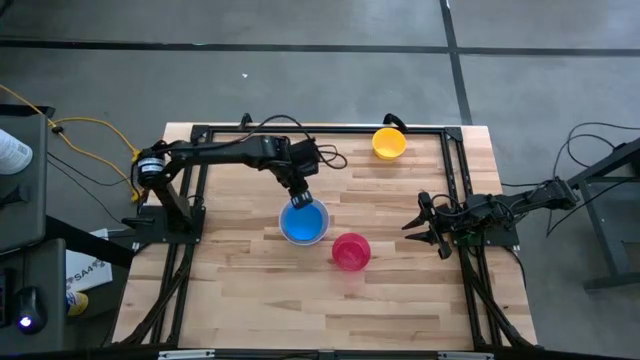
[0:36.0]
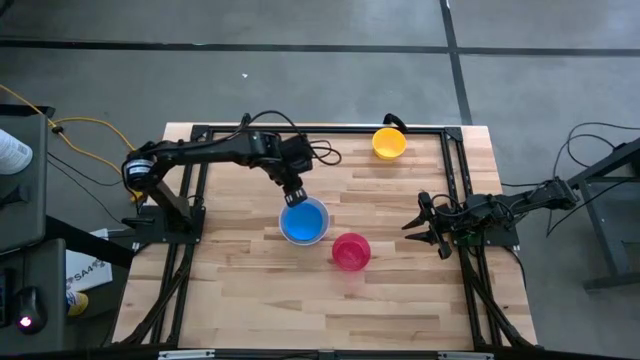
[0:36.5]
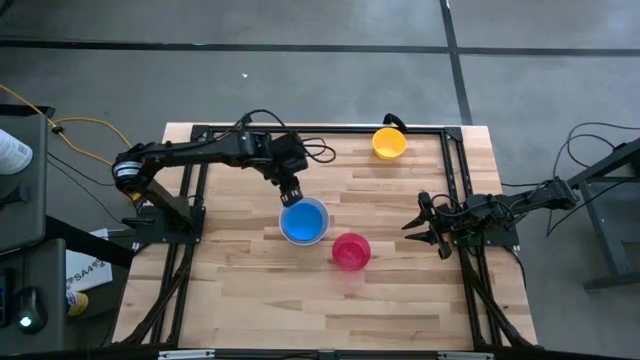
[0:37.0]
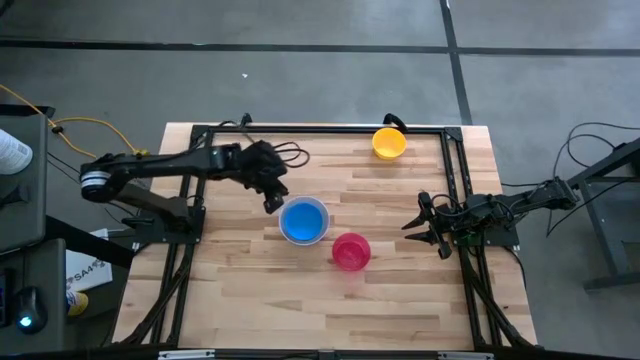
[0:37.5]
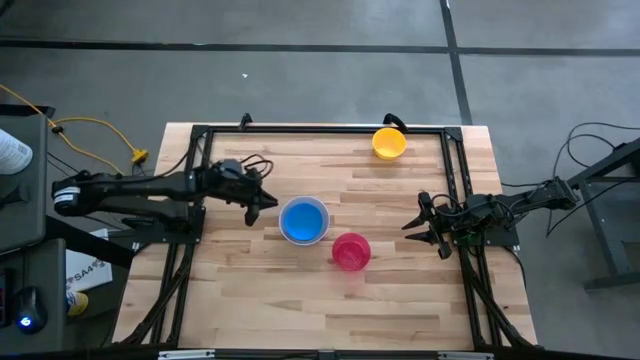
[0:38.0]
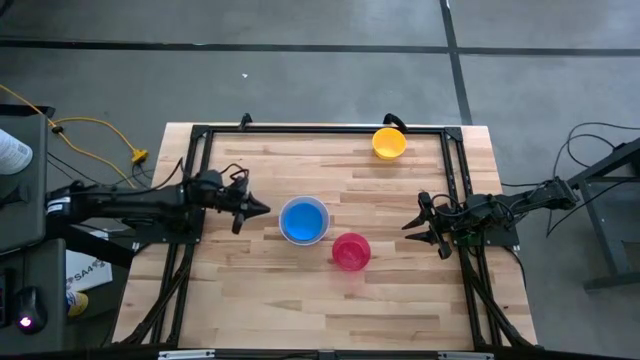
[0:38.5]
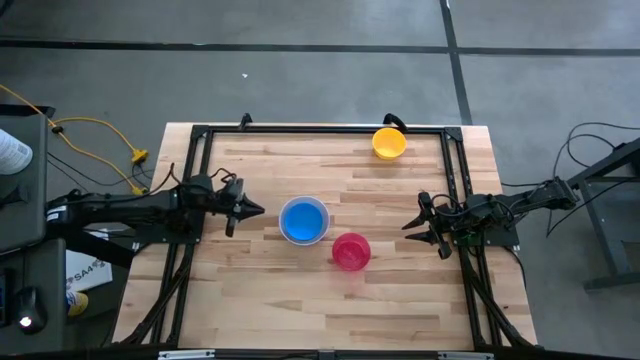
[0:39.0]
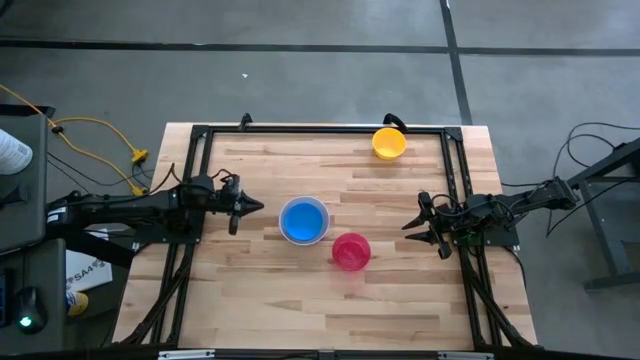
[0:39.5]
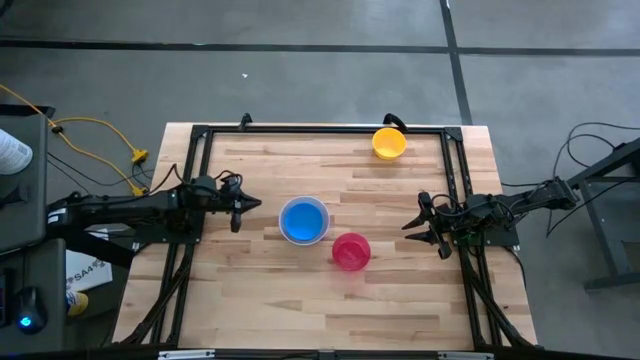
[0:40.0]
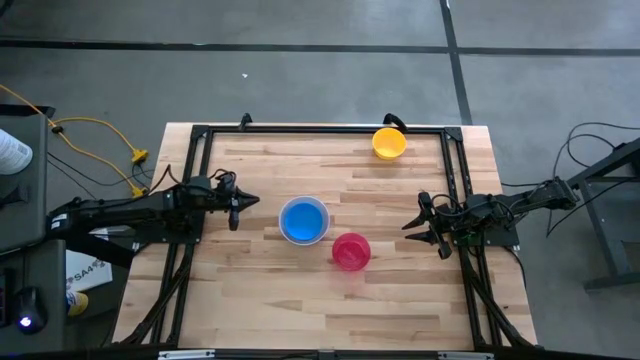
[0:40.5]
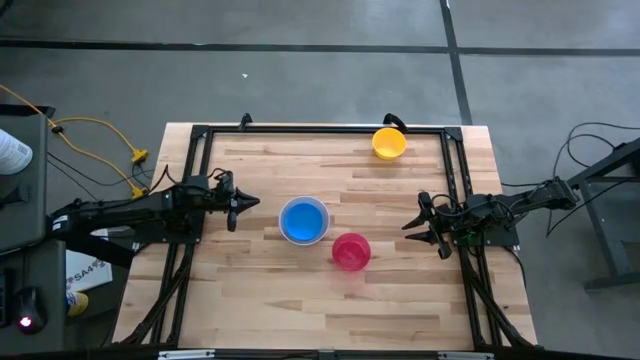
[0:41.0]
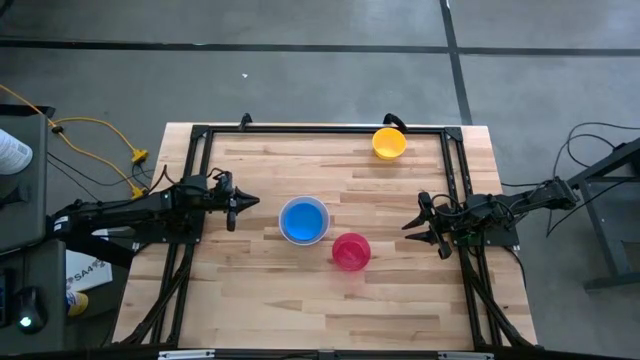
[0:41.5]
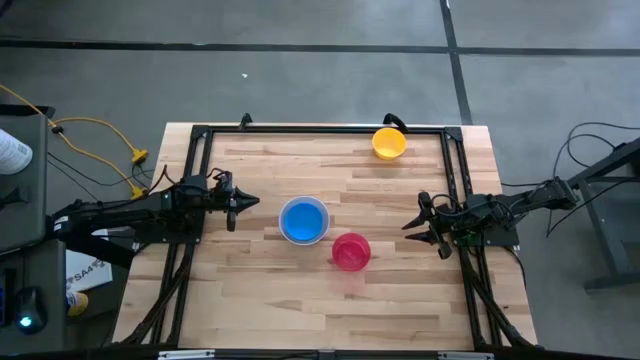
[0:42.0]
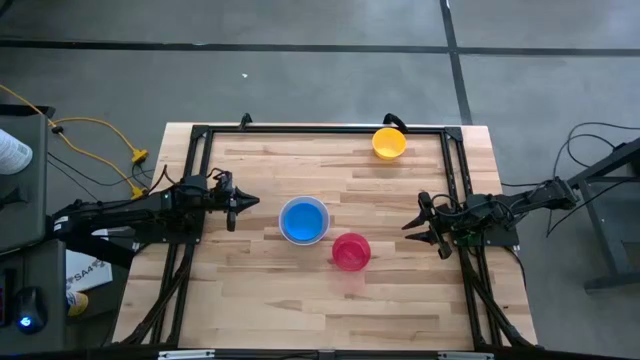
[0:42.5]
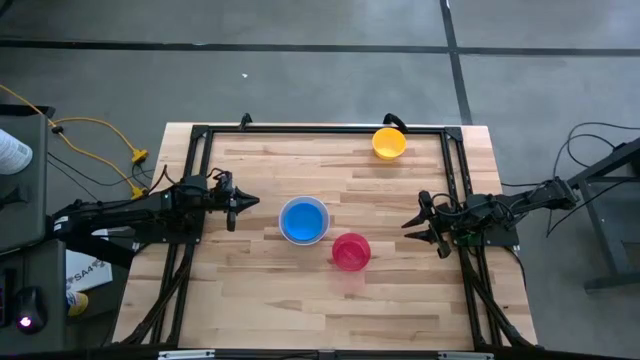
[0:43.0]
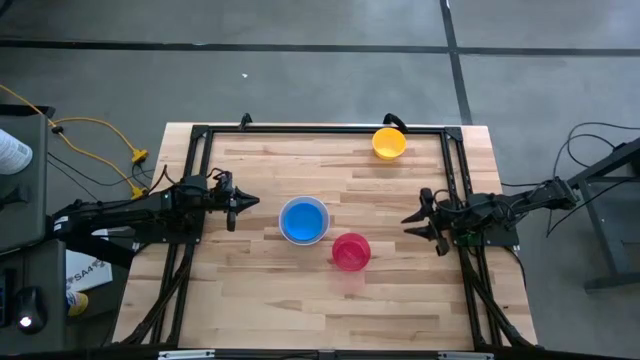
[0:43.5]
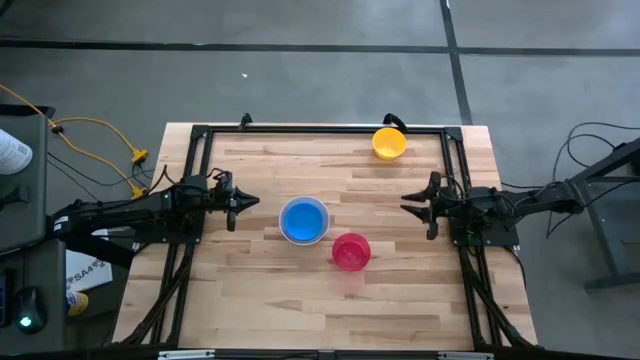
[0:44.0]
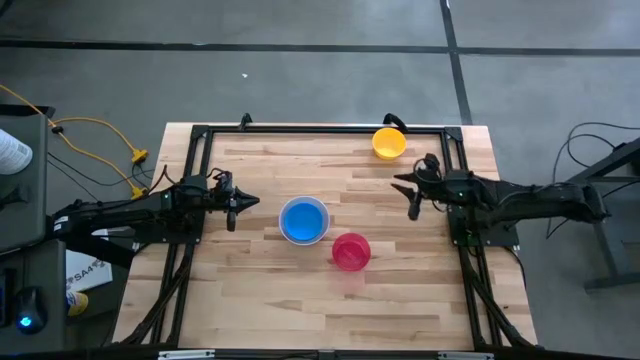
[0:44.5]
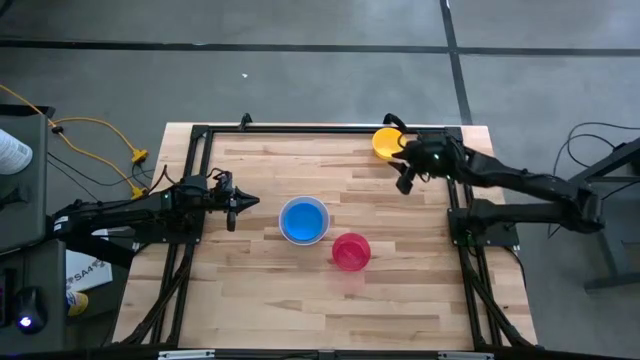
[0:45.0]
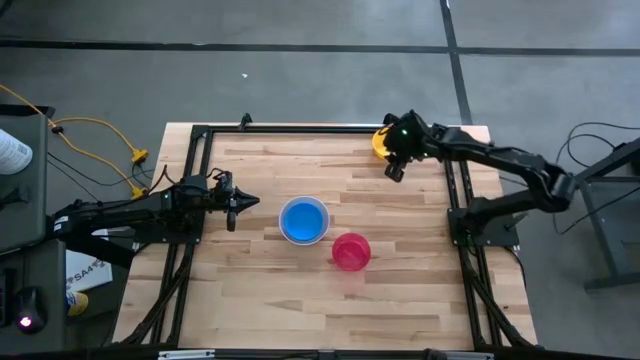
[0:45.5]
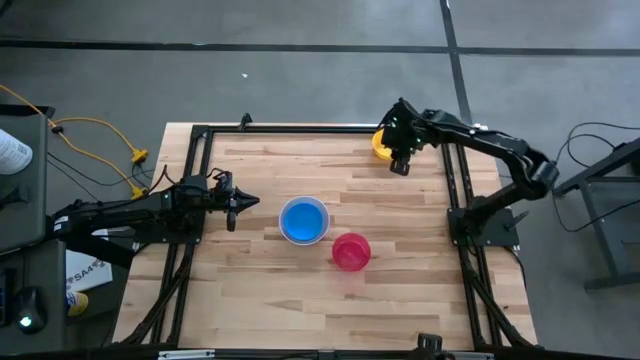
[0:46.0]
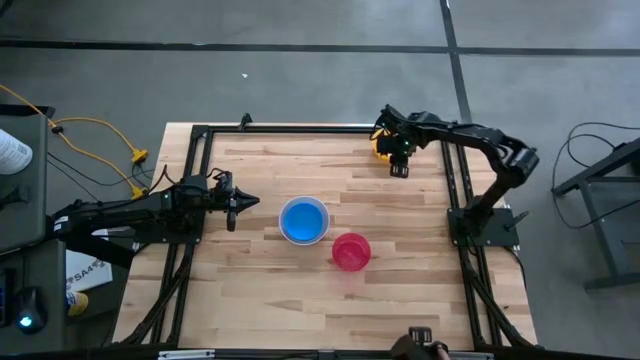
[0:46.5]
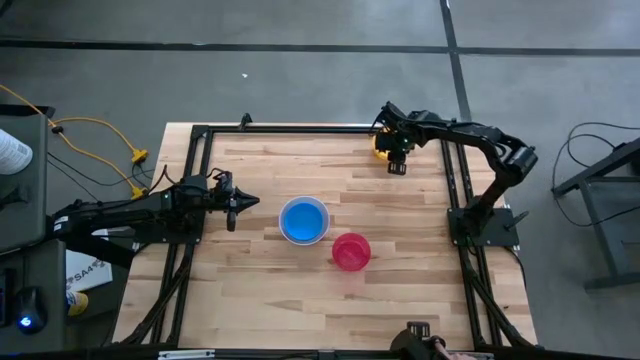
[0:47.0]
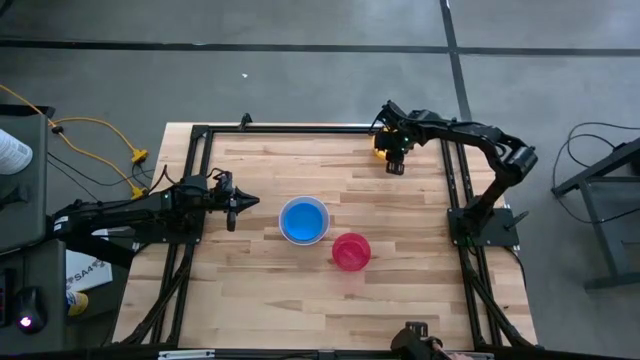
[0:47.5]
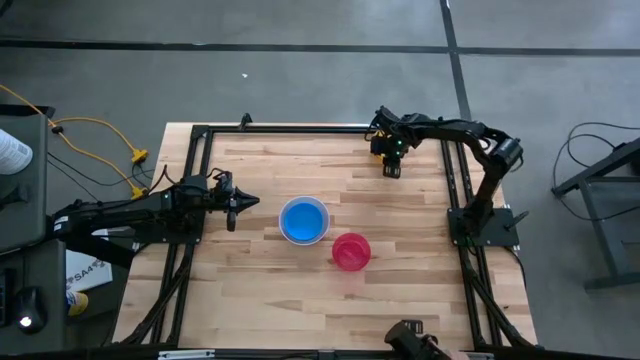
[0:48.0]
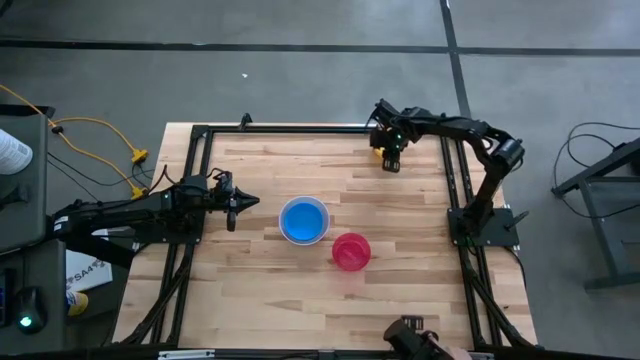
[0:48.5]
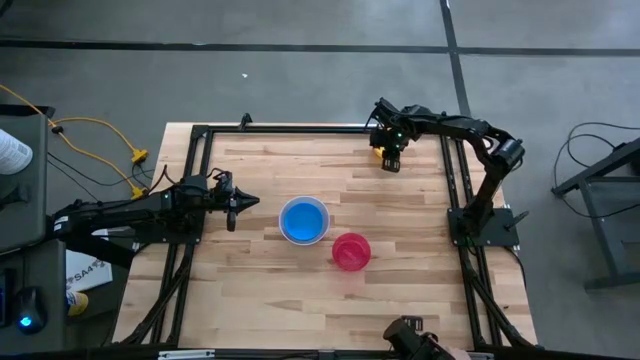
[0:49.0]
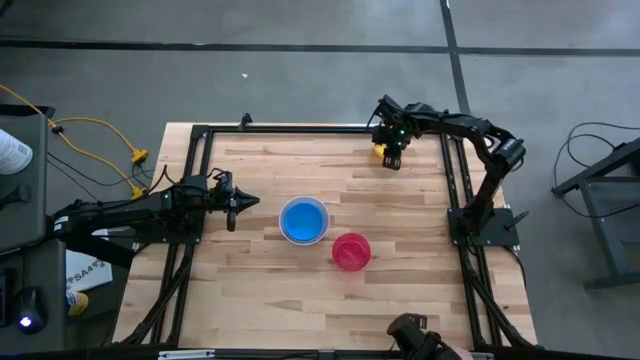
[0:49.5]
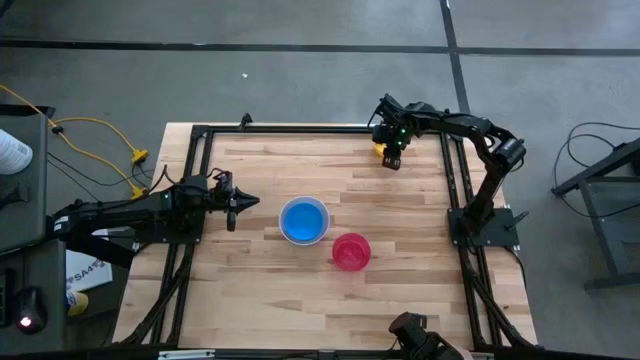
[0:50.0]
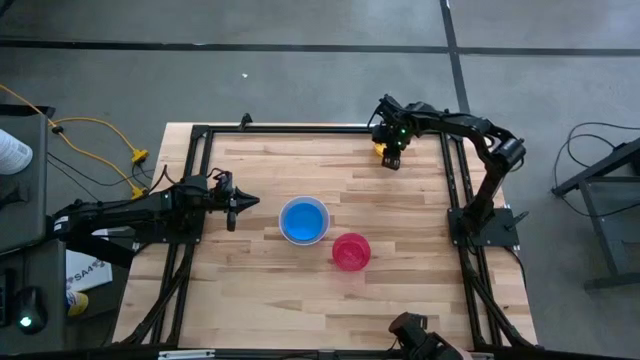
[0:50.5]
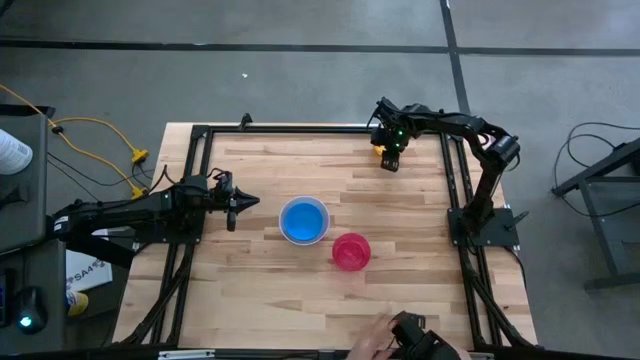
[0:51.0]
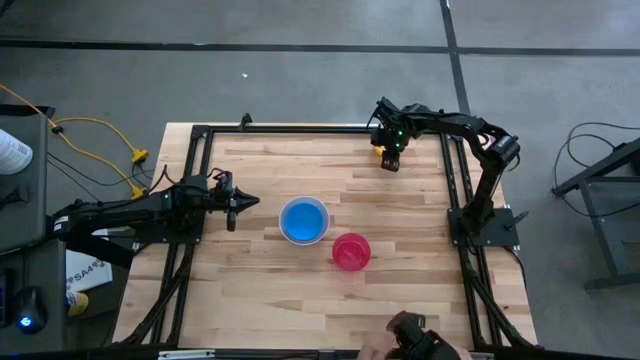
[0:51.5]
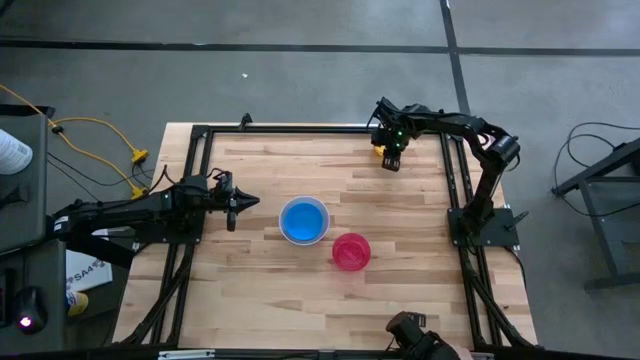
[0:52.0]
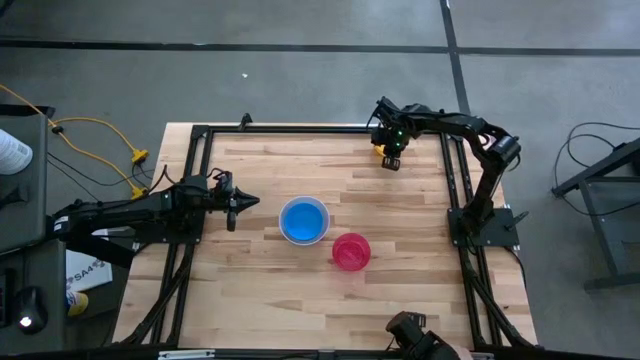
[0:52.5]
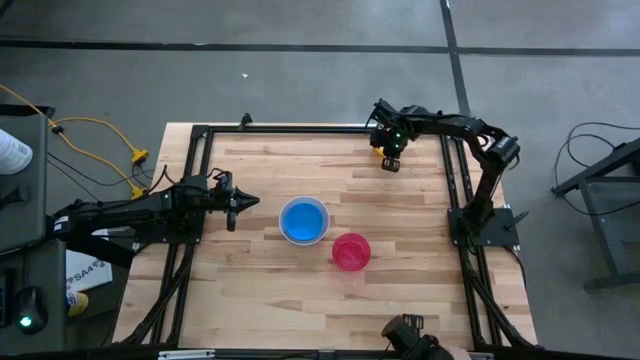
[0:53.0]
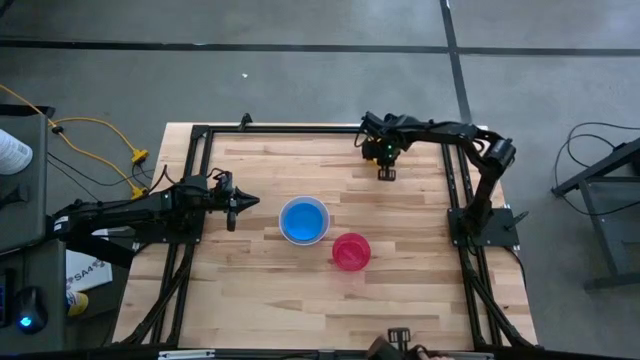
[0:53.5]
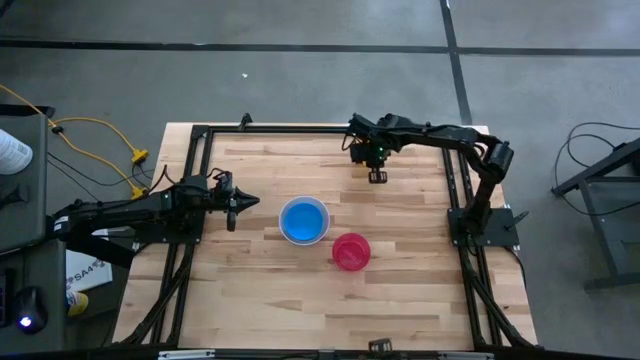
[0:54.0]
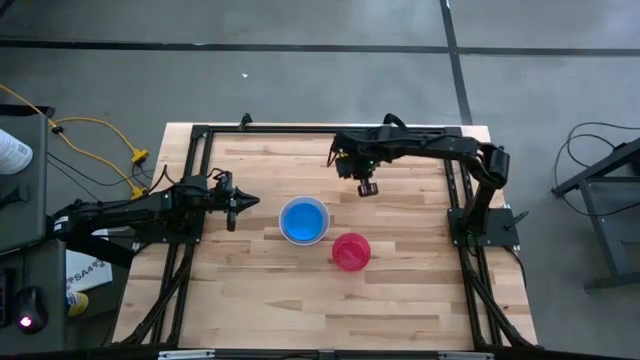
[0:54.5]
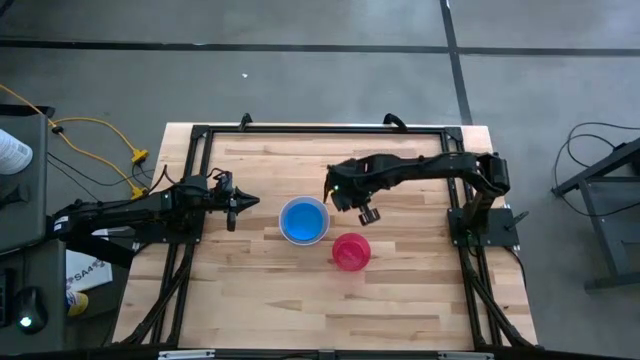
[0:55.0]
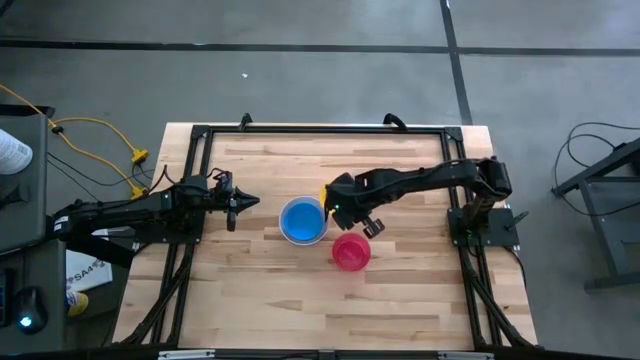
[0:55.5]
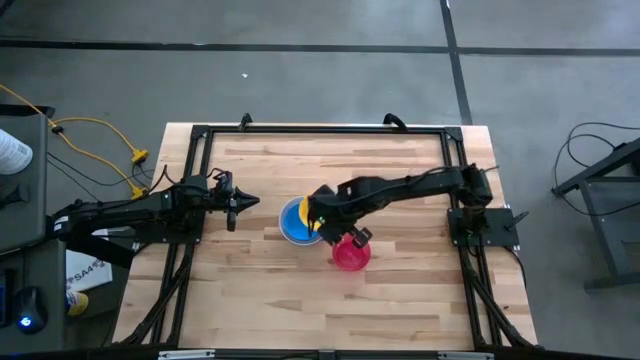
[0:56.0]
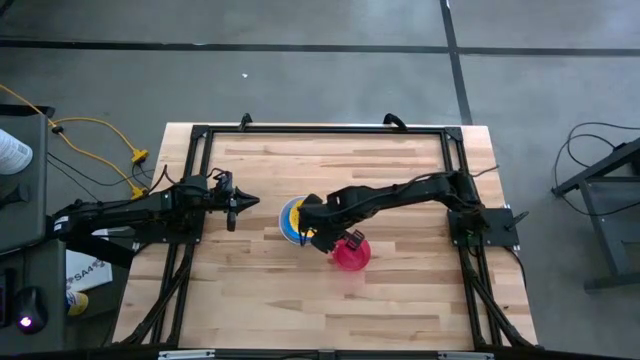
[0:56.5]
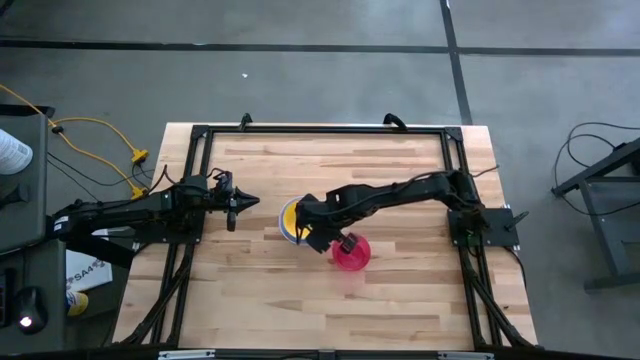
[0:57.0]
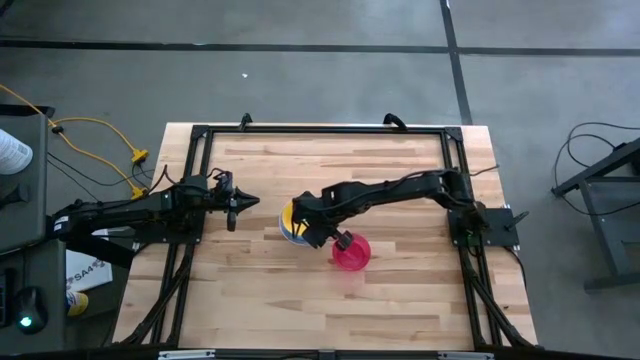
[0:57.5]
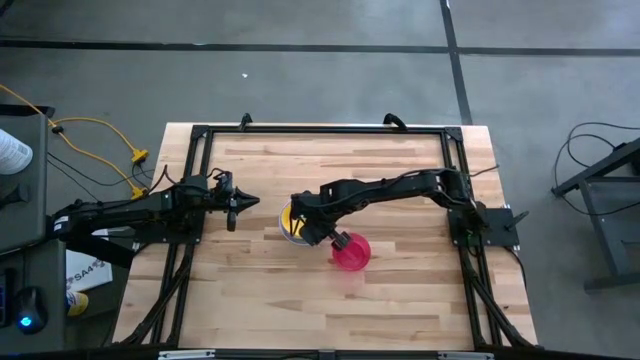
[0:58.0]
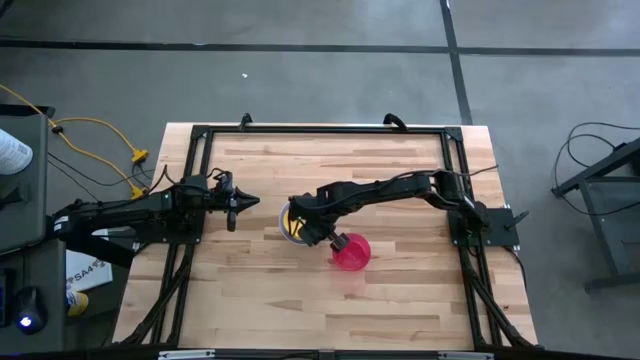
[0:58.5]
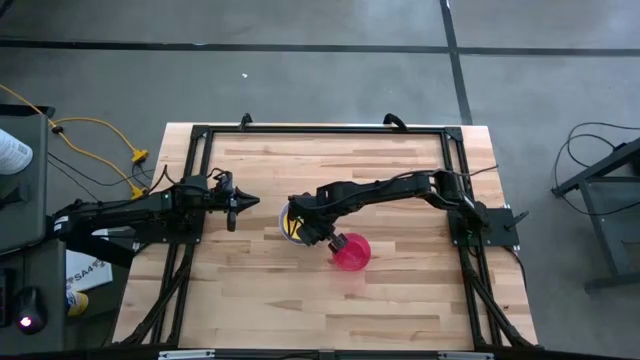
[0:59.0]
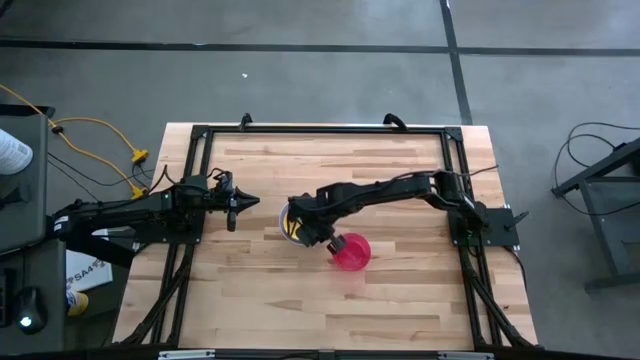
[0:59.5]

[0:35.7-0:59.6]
Stack the yellow bowl on top of the blue bowl
